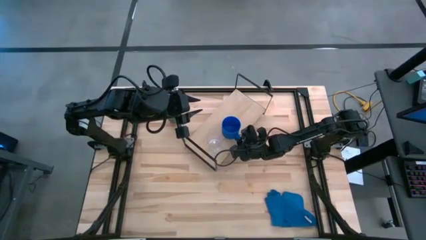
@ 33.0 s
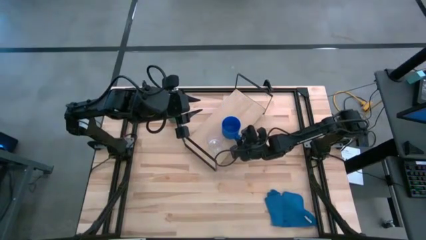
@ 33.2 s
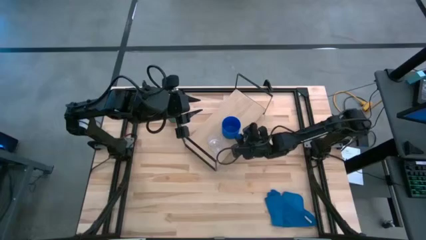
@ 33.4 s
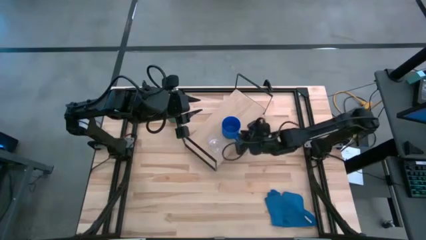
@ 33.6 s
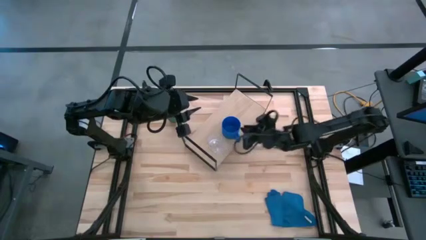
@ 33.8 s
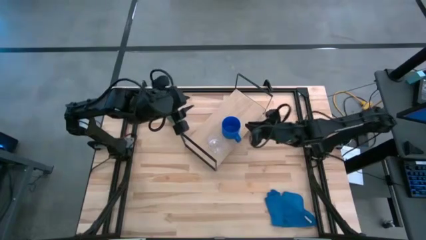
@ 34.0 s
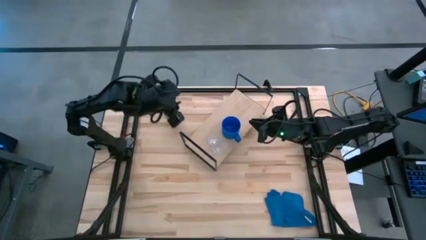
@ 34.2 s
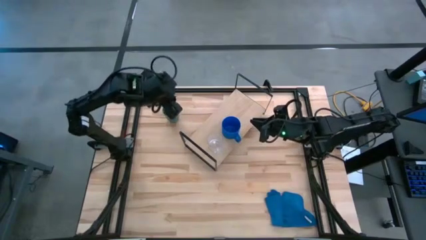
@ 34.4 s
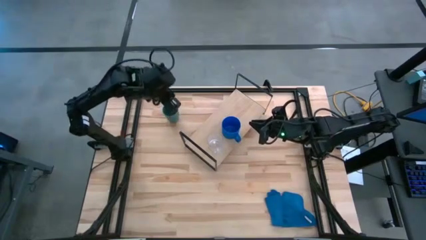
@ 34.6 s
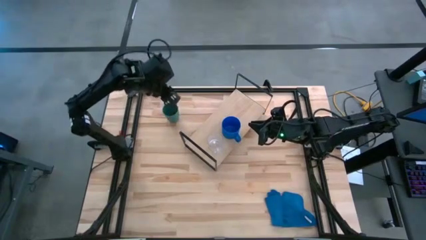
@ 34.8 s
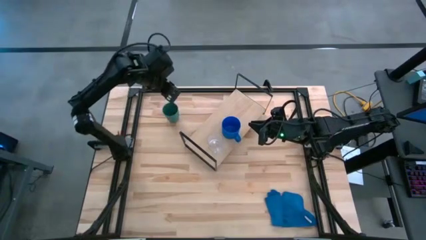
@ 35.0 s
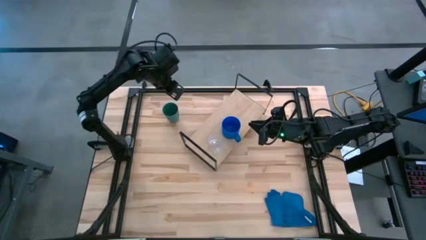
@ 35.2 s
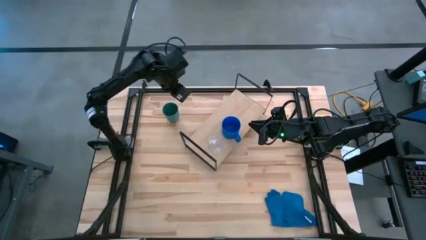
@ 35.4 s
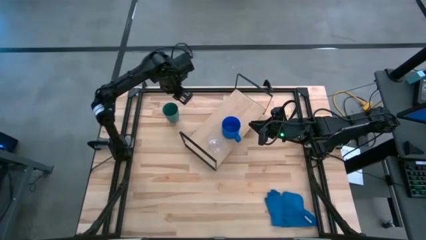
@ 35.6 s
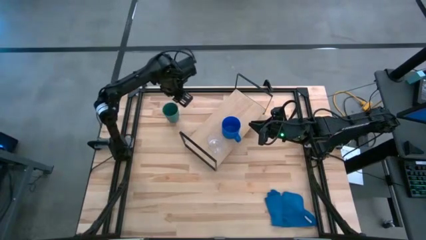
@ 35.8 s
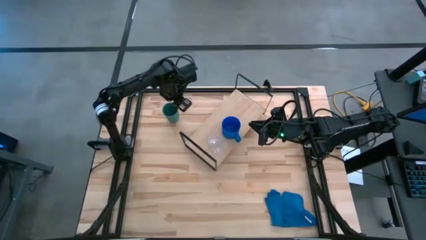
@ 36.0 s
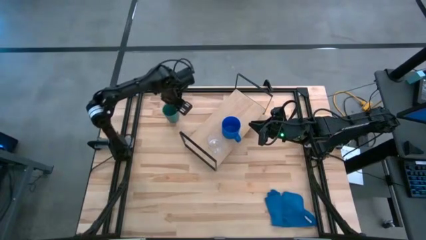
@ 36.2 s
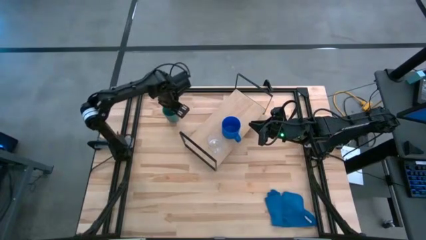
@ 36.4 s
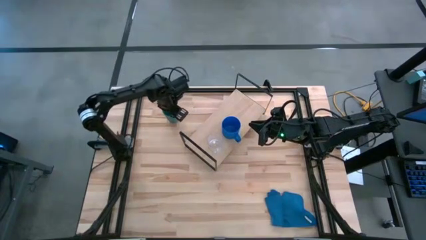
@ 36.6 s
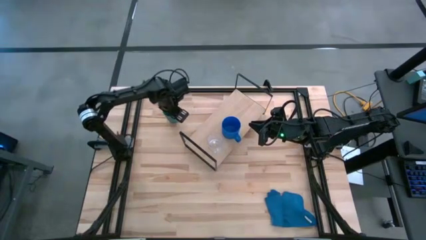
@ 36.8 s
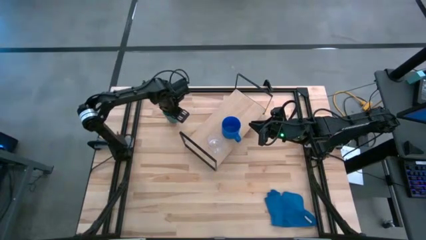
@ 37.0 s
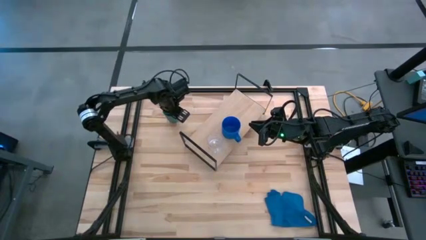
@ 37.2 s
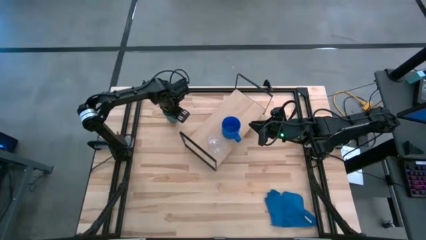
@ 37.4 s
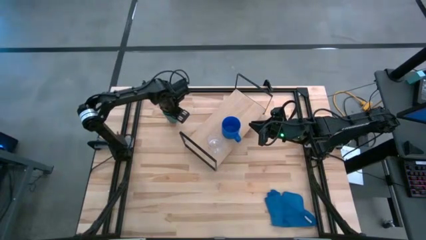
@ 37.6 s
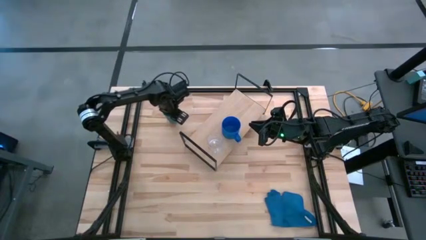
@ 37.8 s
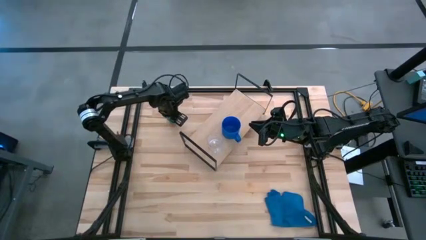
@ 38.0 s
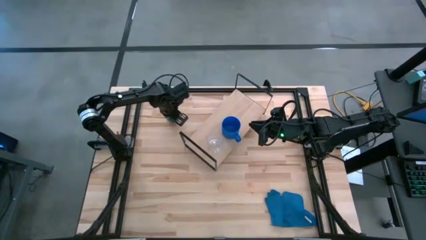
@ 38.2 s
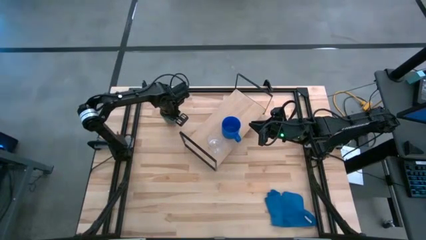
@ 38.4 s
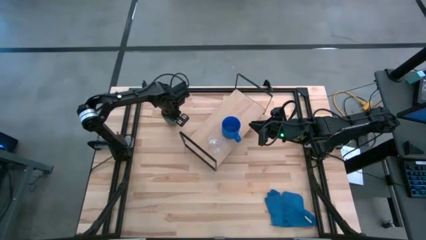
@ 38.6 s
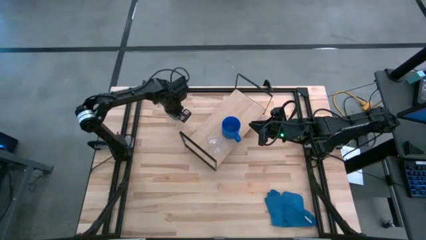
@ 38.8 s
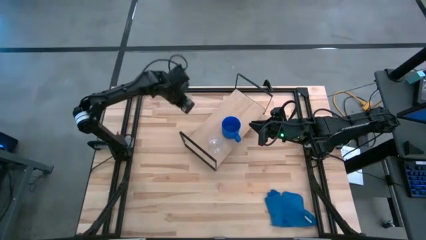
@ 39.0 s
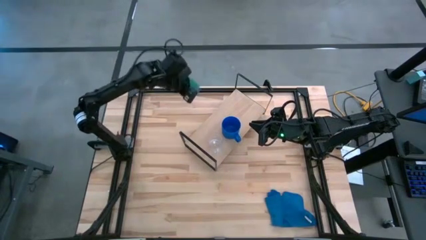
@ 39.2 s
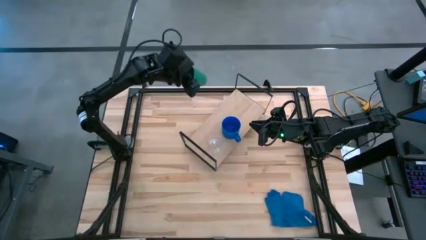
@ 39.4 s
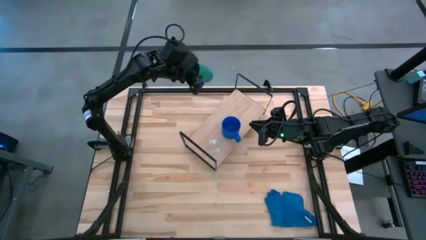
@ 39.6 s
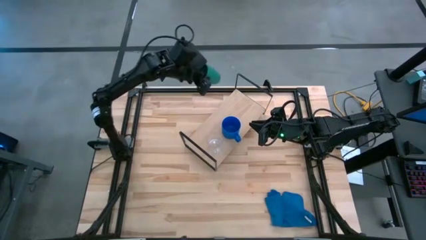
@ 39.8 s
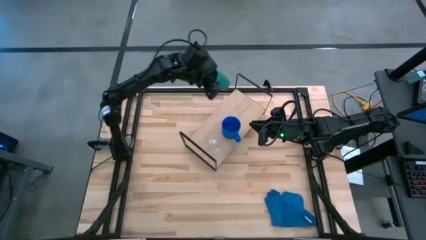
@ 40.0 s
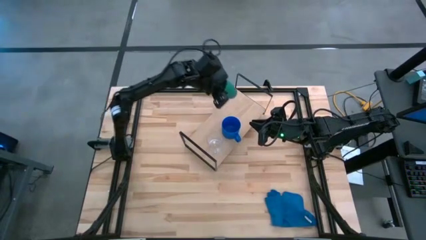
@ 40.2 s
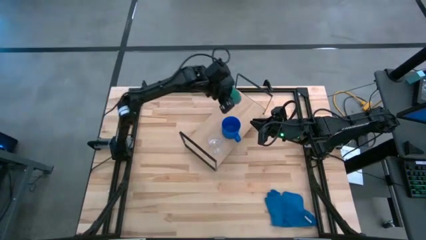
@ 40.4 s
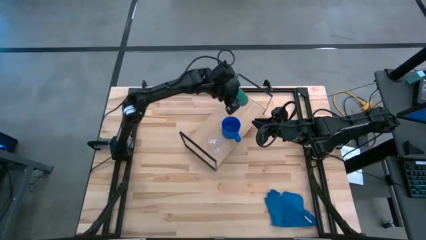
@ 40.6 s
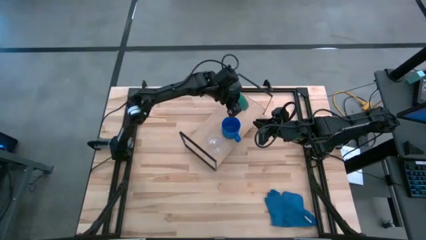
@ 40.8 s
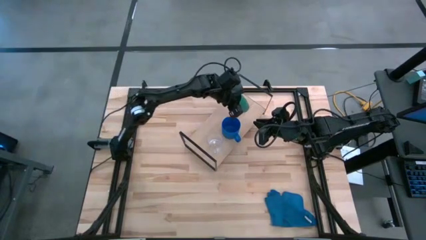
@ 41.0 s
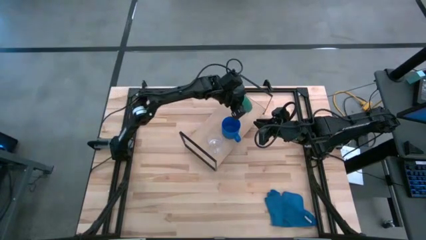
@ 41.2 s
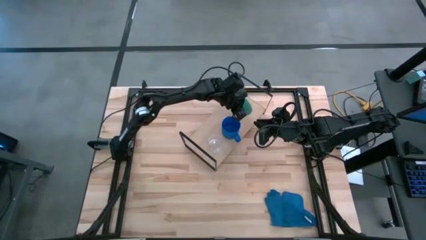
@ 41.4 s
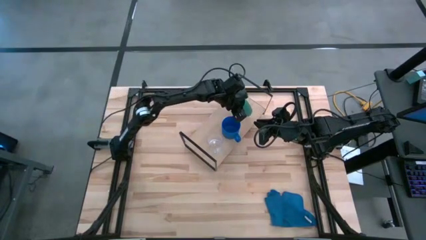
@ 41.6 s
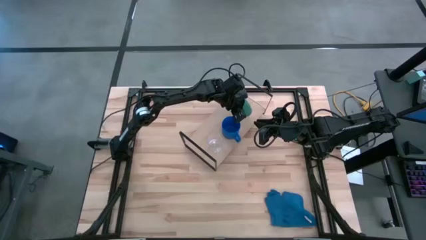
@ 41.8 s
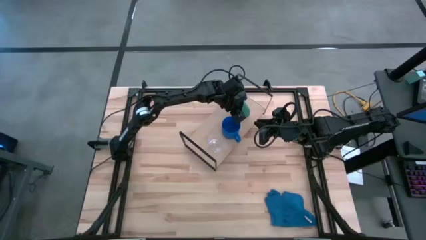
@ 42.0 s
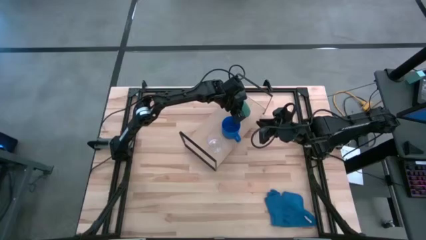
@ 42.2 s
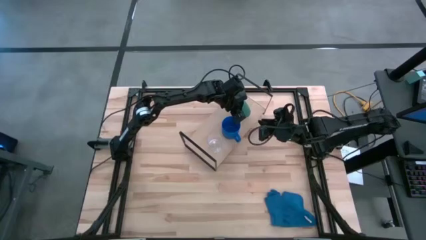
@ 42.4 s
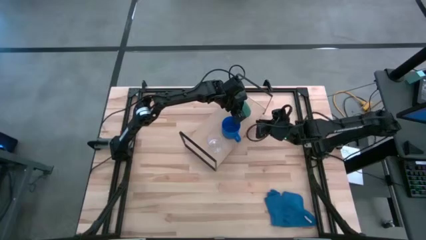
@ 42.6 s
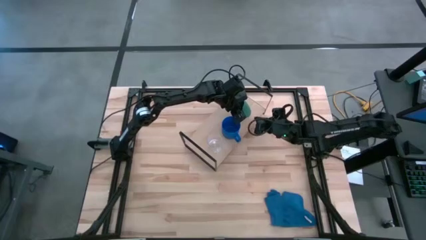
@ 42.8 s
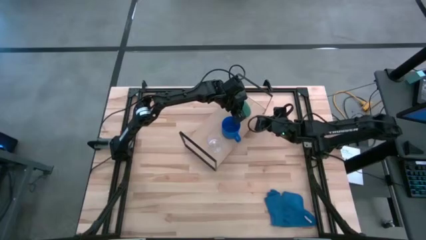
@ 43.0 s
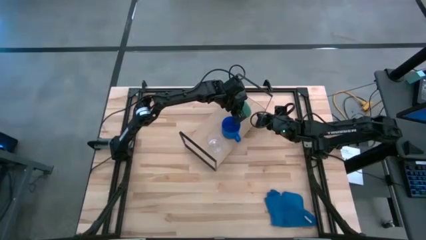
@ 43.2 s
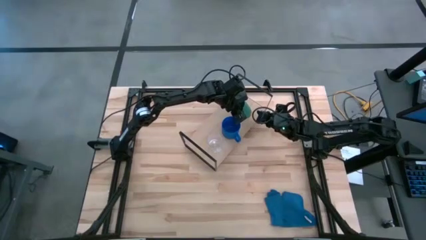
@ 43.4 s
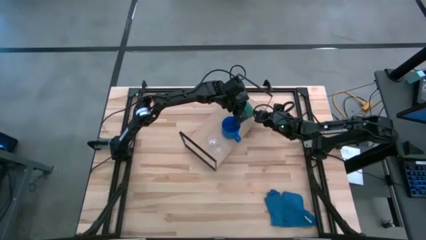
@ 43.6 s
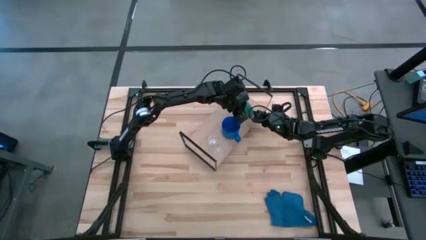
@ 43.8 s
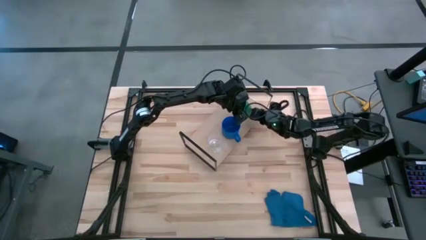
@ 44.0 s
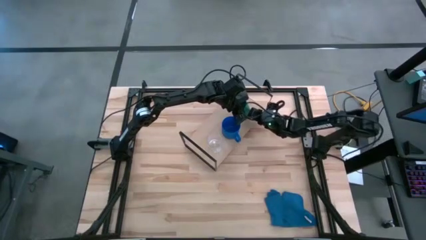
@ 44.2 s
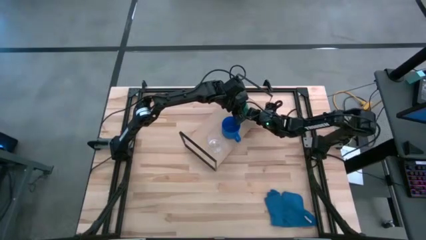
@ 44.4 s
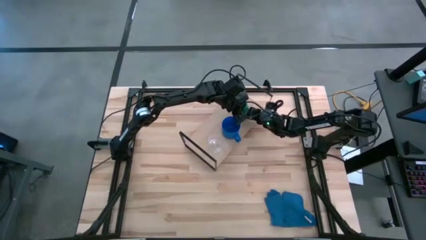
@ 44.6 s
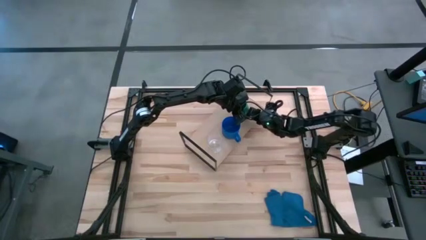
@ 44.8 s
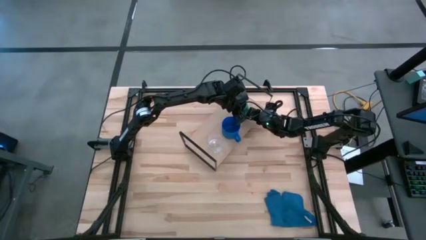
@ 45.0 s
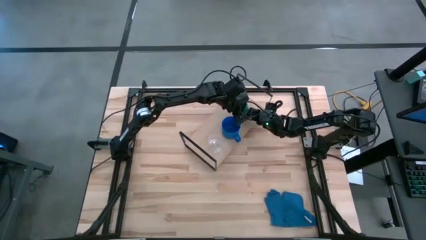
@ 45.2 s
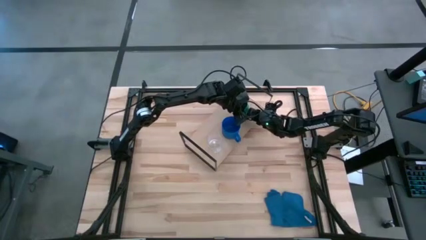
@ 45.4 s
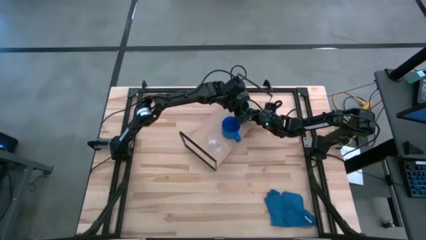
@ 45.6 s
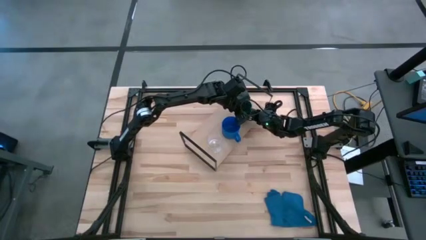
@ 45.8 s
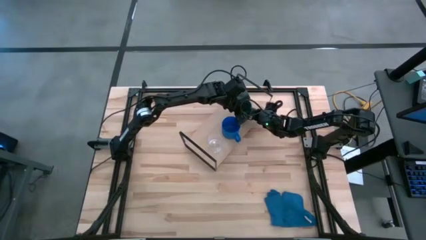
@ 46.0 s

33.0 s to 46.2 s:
Task: Stack small to large cups/mugs on shelf
Put the green cup on the shelf

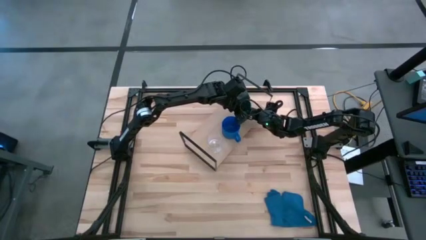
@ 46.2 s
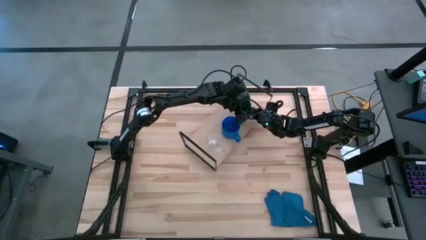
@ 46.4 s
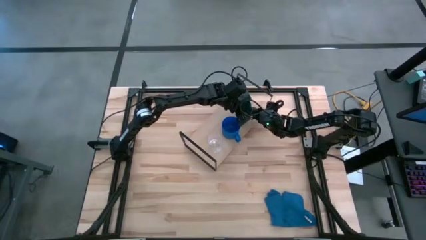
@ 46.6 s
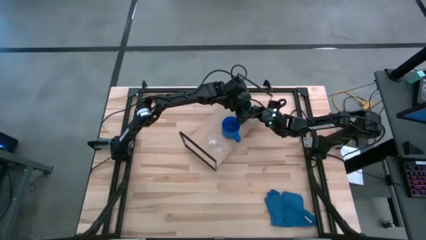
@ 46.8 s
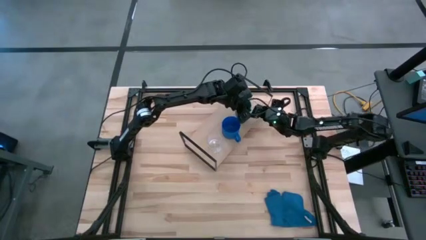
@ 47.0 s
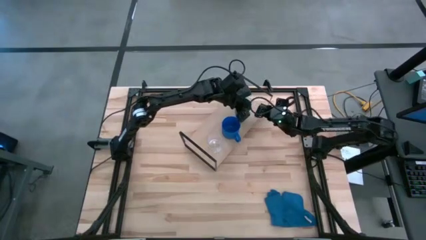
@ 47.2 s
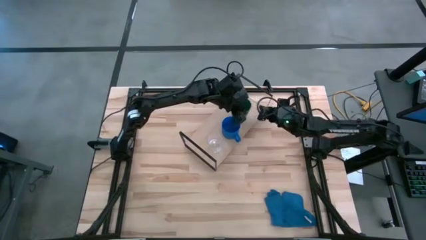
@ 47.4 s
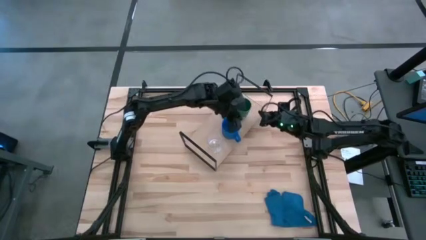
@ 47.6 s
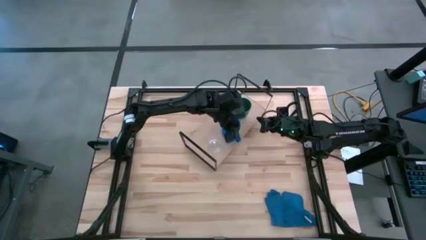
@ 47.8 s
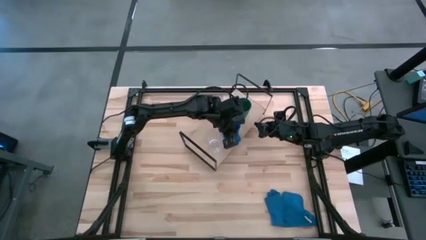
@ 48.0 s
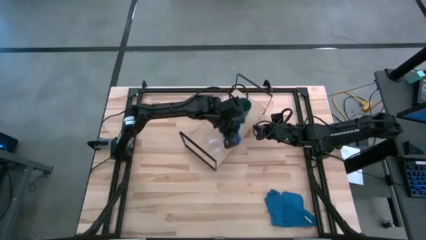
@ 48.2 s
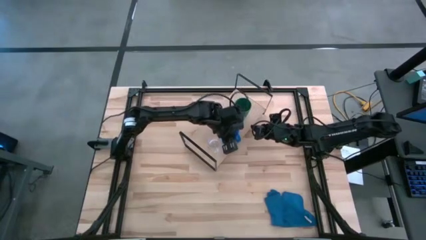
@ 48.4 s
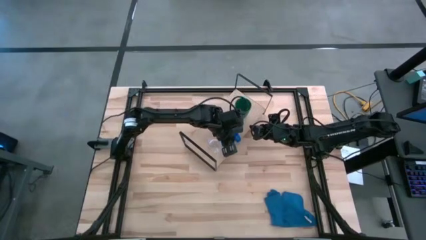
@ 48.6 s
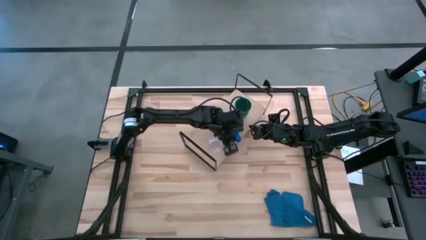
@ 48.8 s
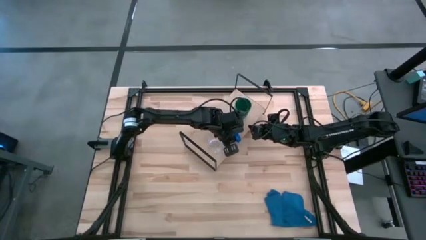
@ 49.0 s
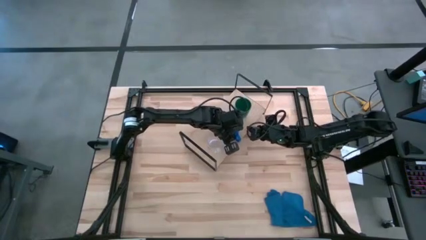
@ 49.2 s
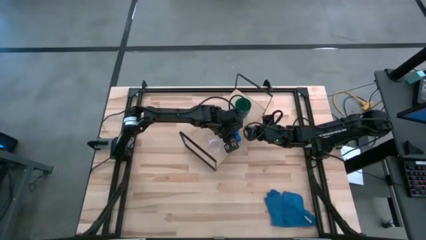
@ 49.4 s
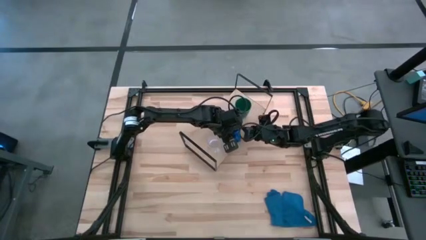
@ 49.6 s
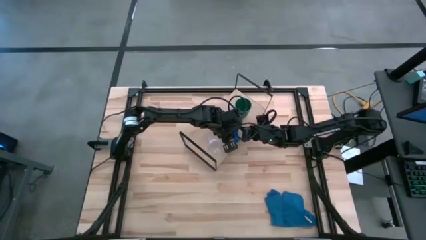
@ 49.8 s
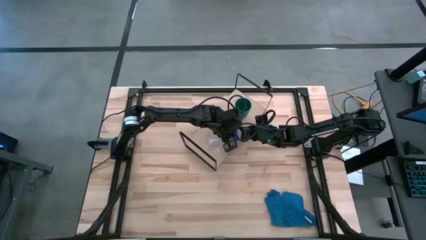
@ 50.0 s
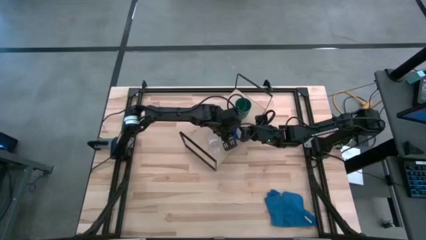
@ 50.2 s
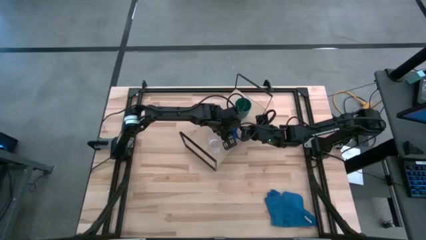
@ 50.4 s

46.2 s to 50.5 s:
Adjust the blue mug and the green cup on the shelf
